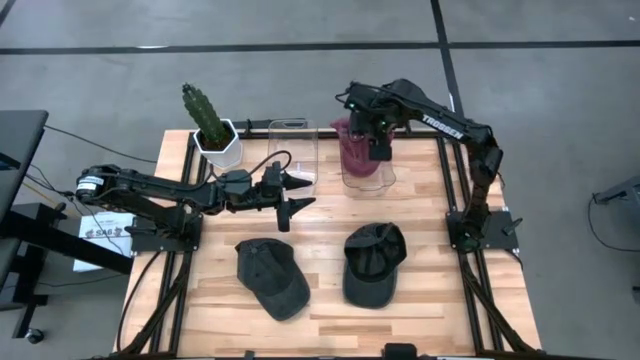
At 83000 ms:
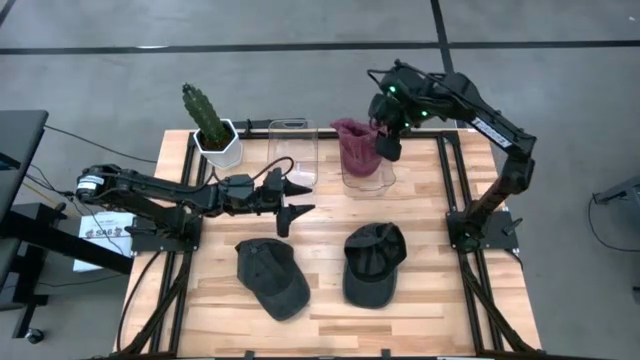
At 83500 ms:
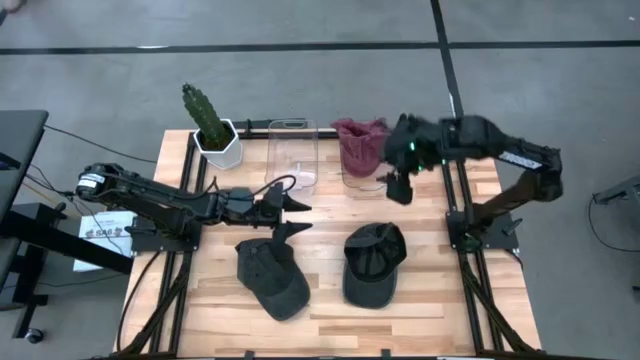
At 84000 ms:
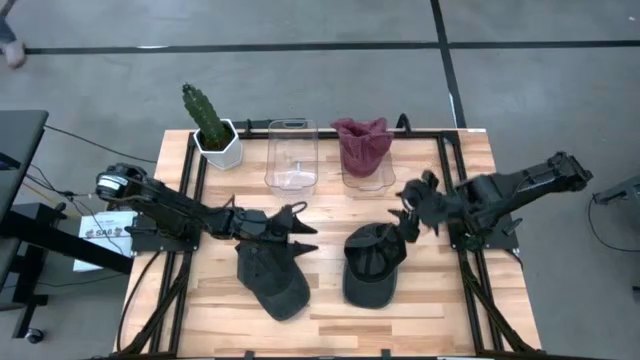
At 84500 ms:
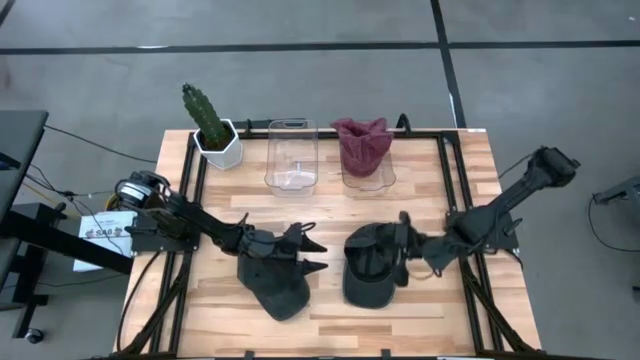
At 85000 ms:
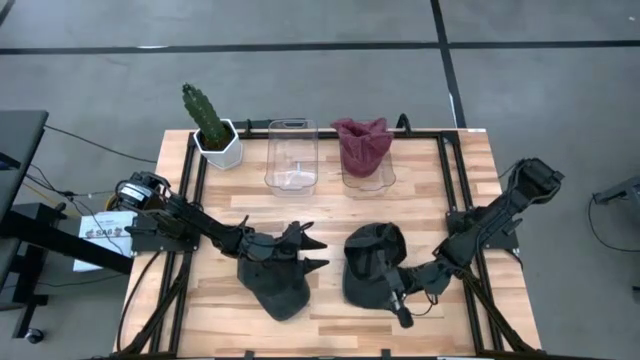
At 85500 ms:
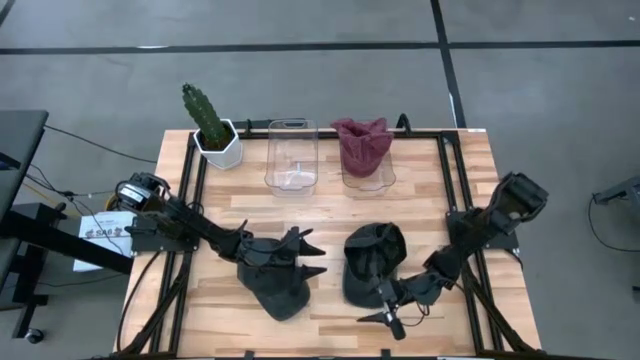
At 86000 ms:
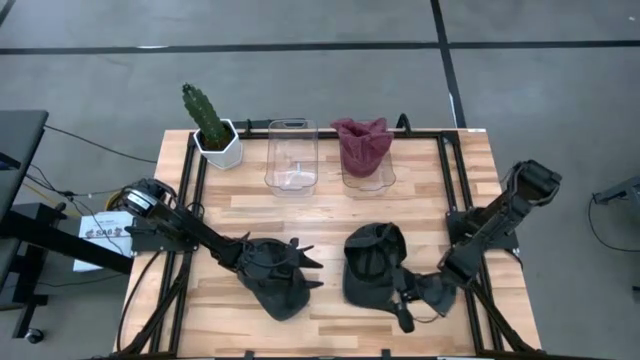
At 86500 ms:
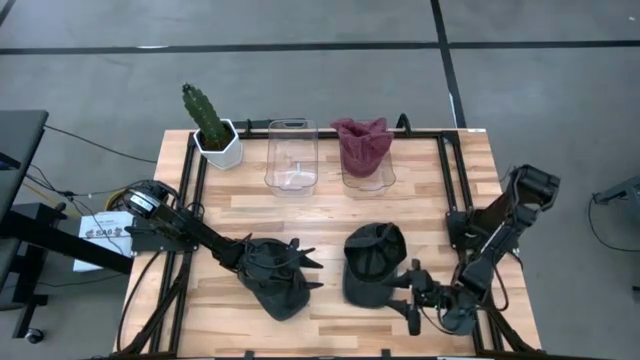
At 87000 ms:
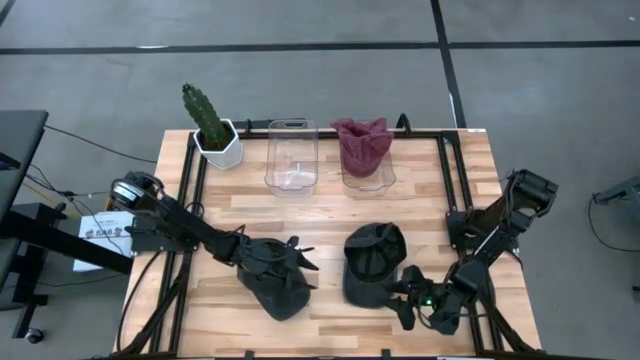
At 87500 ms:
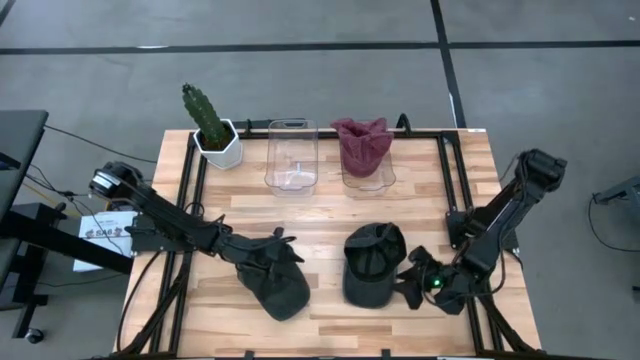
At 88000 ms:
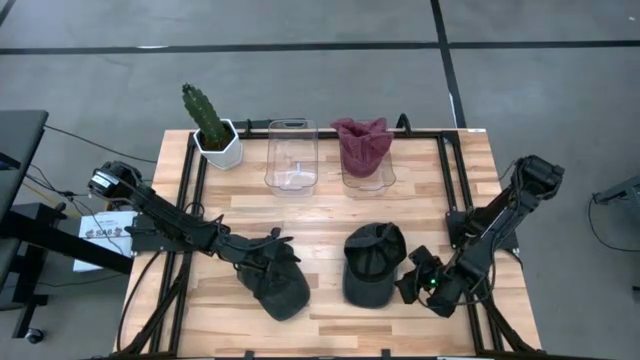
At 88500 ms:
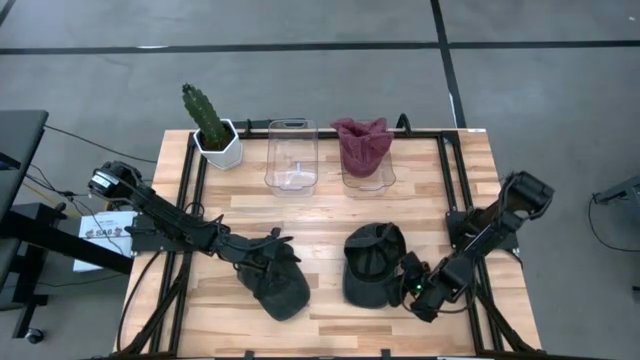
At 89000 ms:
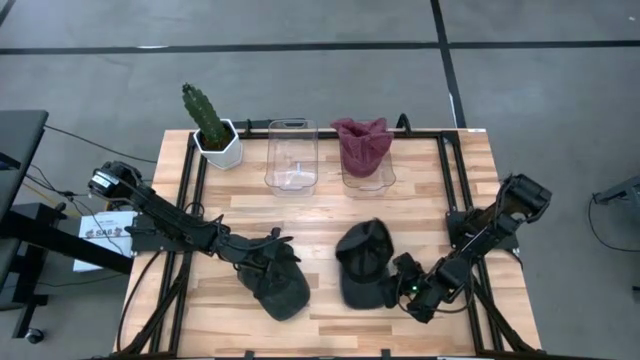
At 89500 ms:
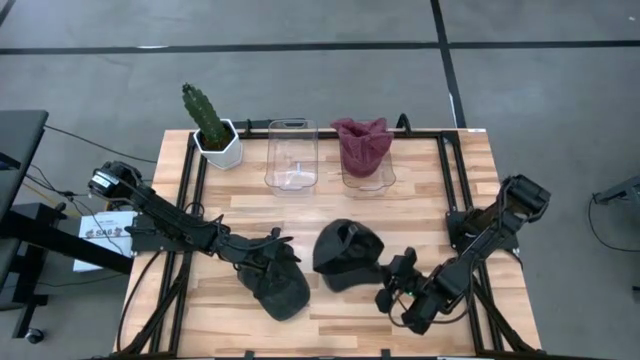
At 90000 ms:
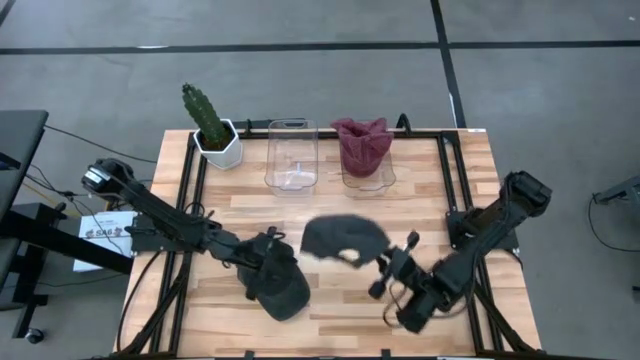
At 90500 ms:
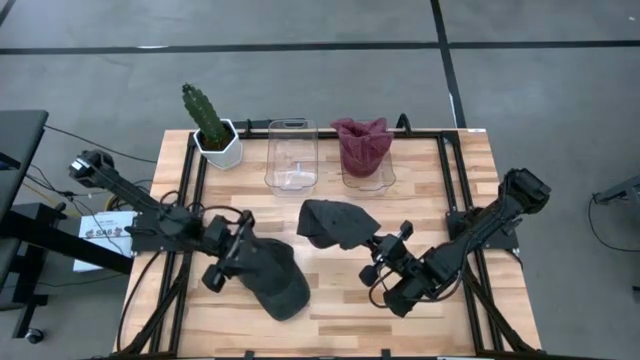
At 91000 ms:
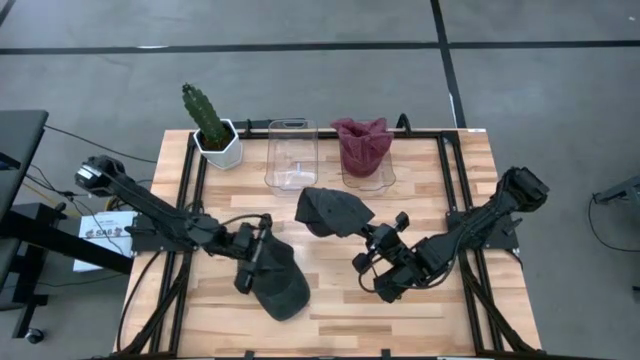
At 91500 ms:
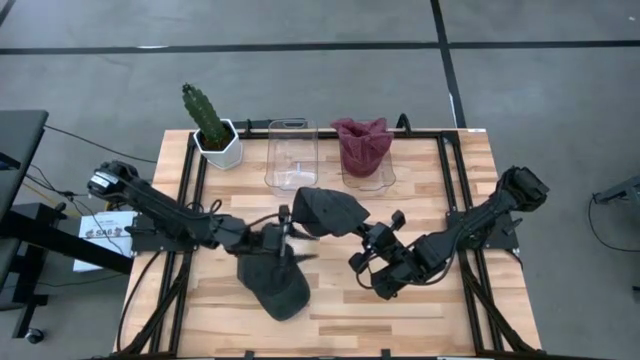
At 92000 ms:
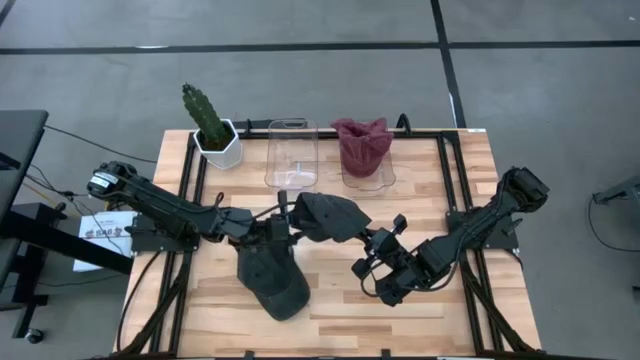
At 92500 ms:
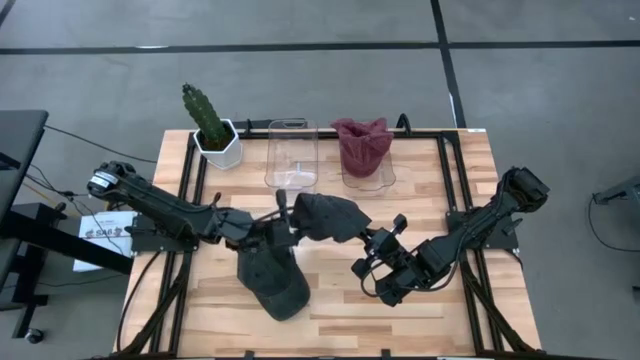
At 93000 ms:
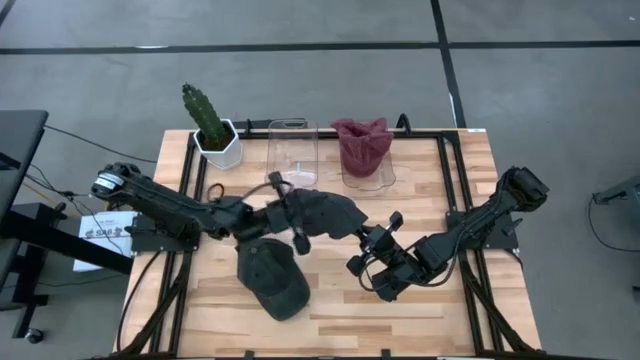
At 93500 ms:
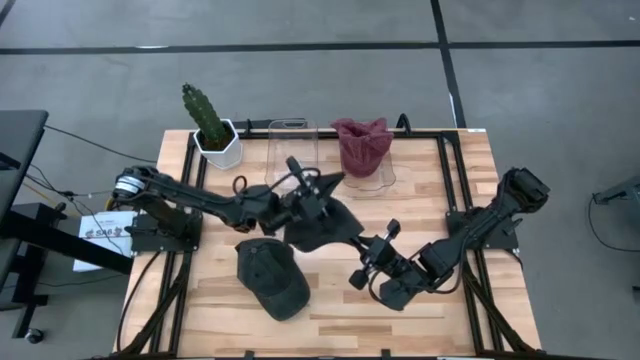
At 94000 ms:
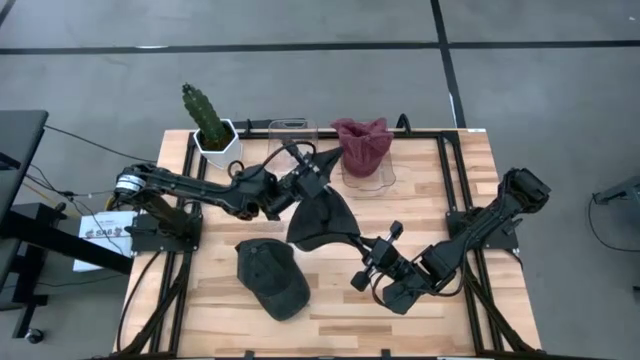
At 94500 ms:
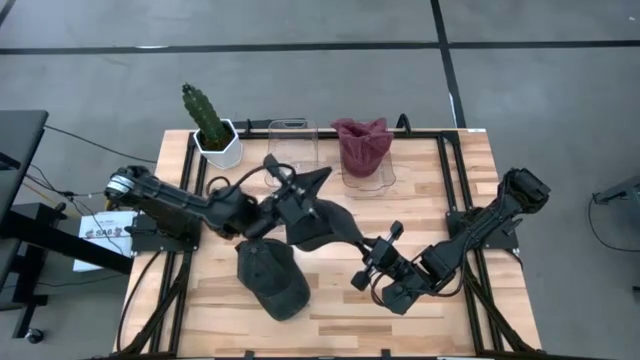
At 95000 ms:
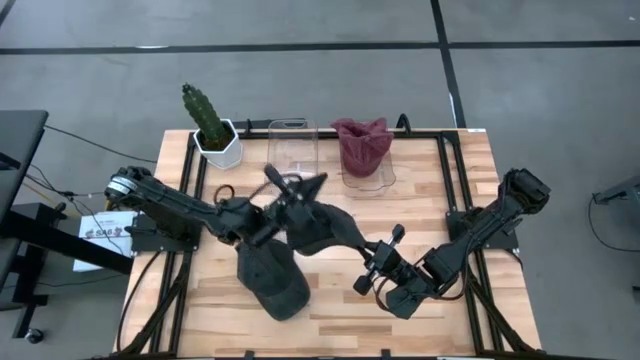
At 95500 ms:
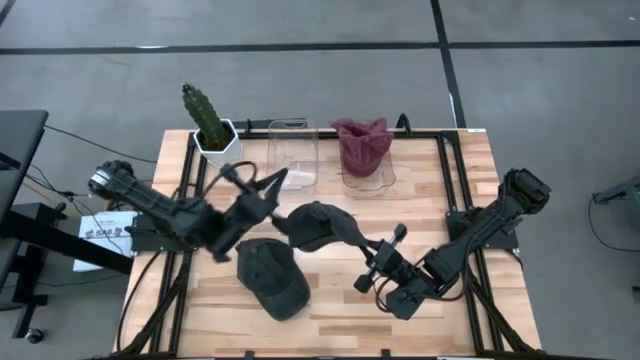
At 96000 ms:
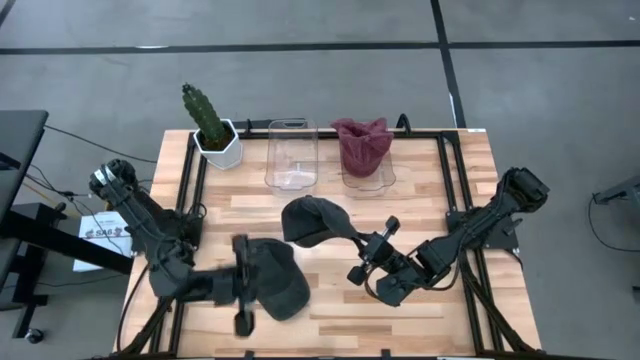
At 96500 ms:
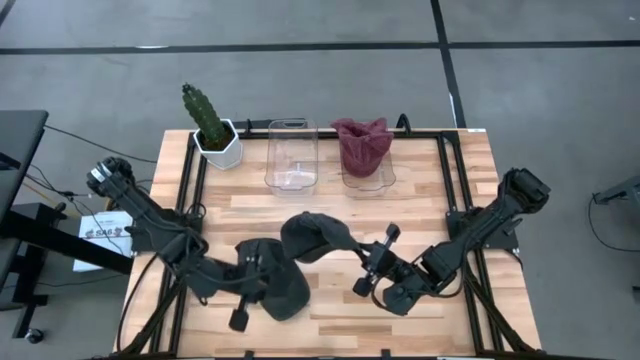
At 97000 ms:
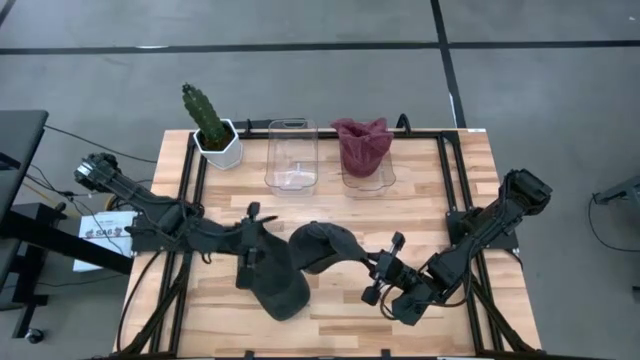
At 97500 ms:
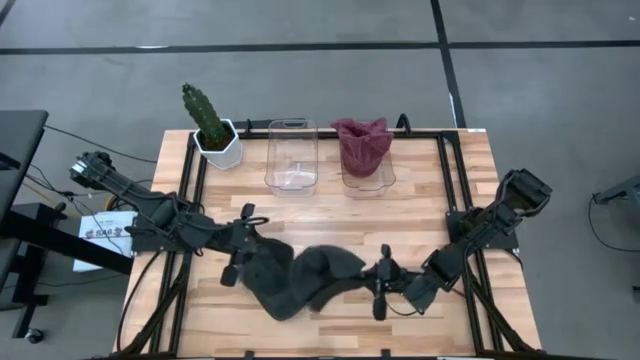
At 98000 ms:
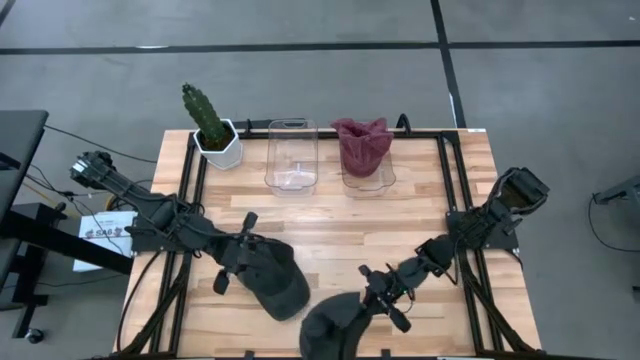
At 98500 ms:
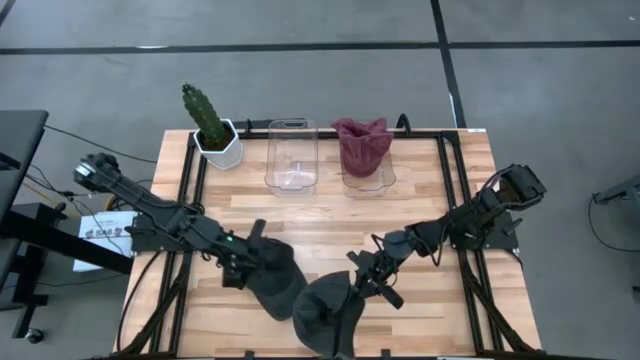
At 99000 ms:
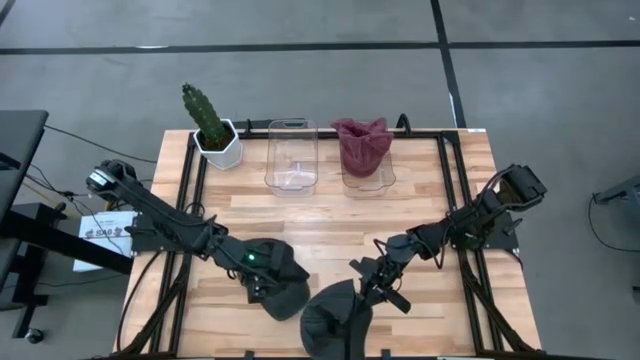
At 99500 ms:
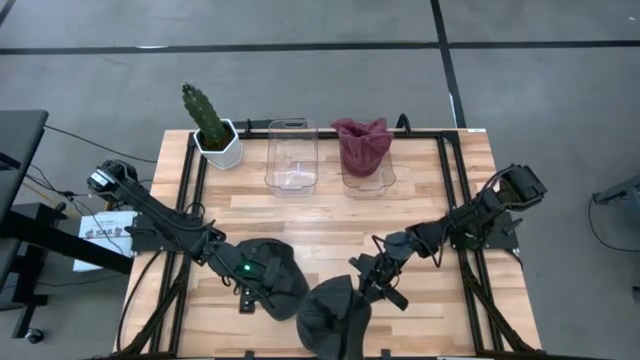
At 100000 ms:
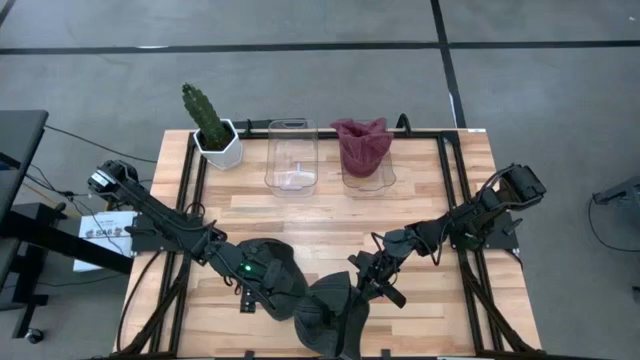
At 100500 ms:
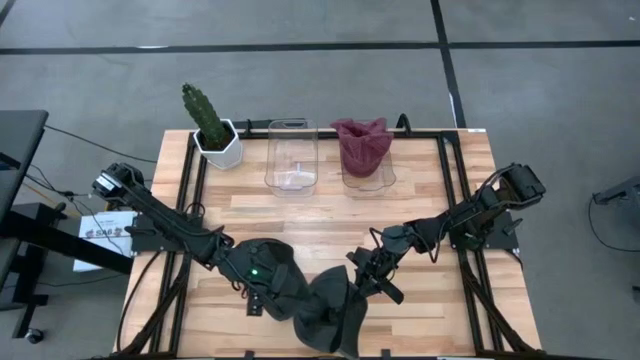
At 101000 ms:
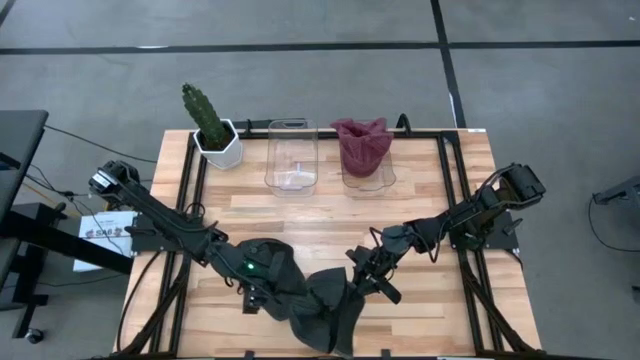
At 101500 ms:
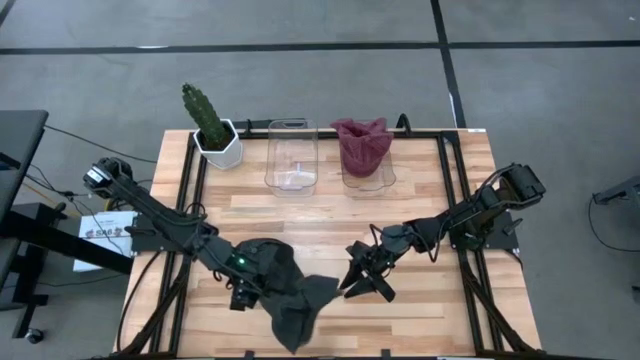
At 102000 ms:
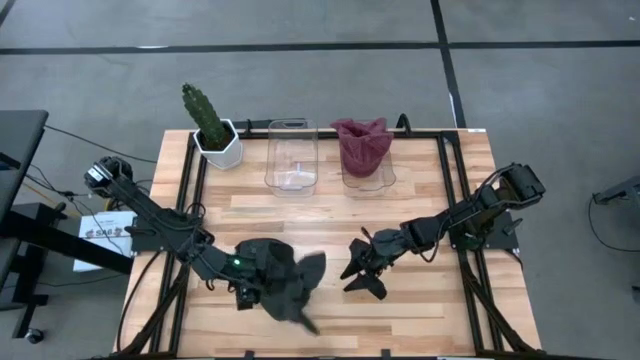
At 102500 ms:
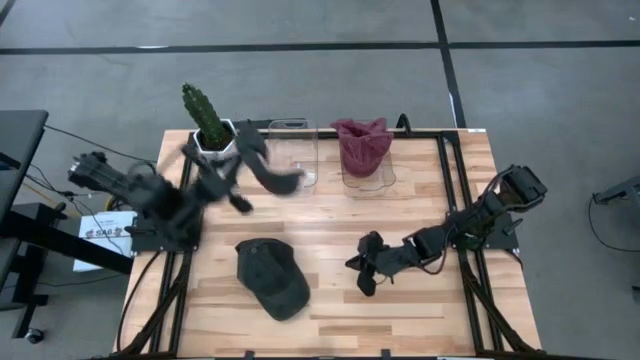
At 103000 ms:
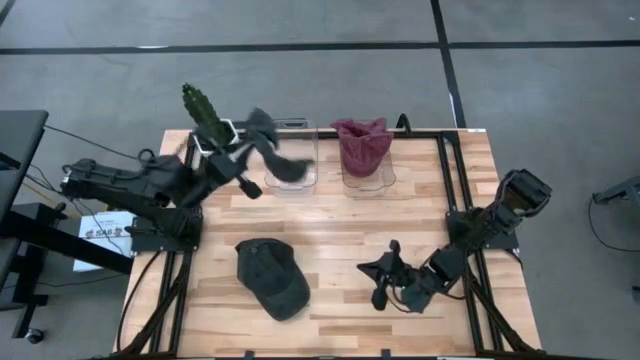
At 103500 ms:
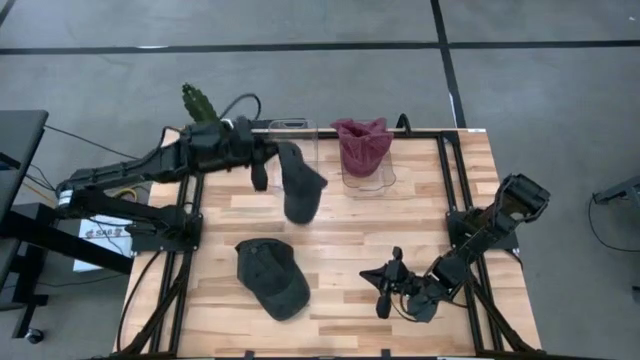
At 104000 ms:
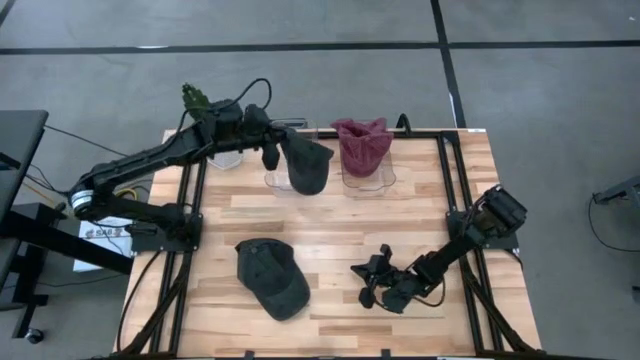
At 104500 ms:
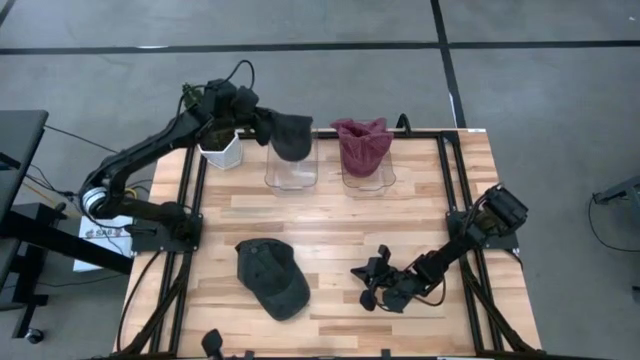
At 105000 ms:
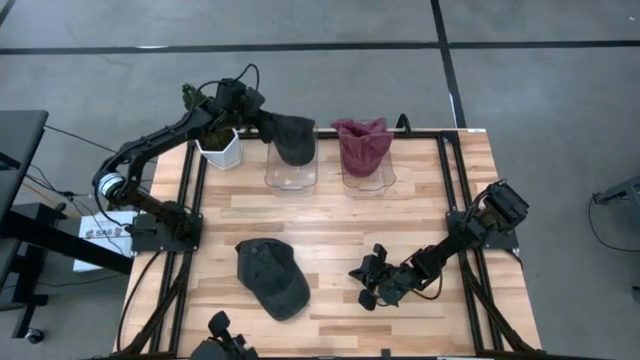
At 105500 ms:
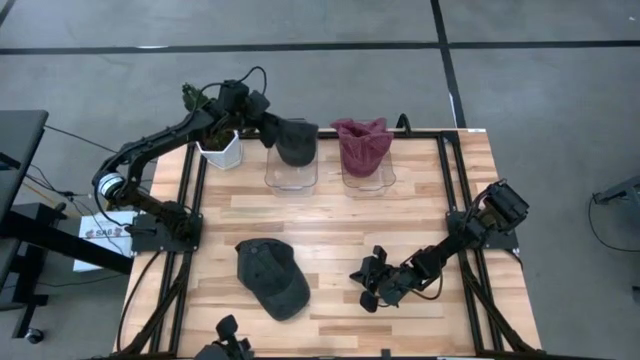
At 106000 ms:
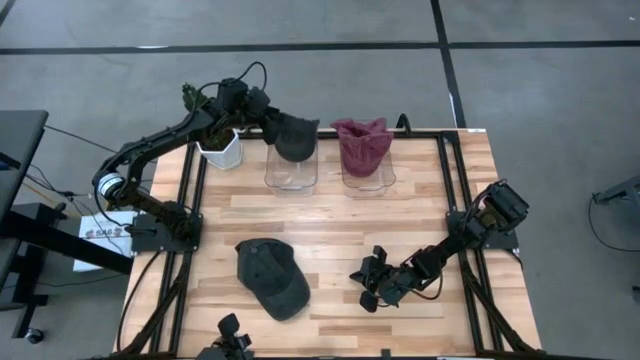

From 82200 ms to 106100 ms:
Task: Pick & Place hat
Put the right black cap into the left transparent bin
